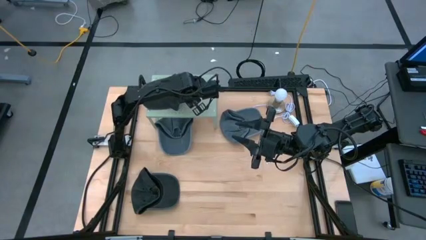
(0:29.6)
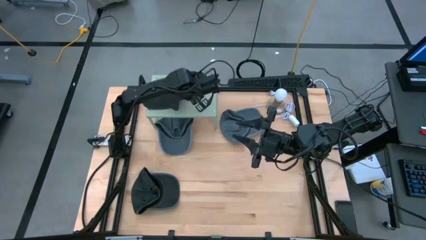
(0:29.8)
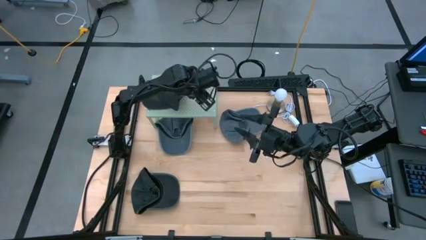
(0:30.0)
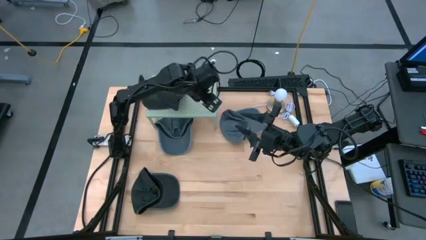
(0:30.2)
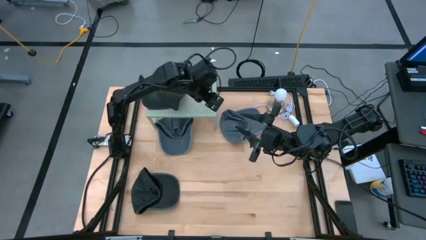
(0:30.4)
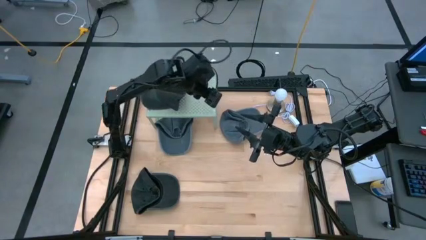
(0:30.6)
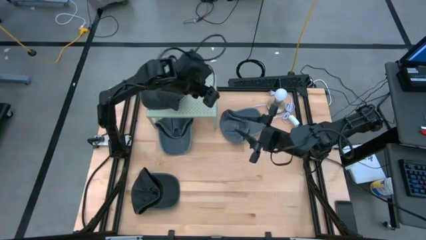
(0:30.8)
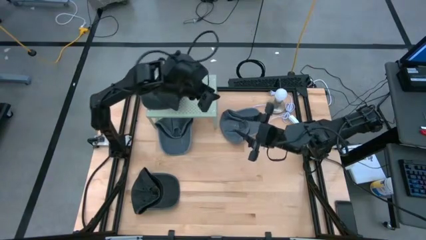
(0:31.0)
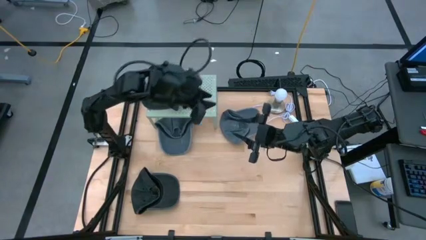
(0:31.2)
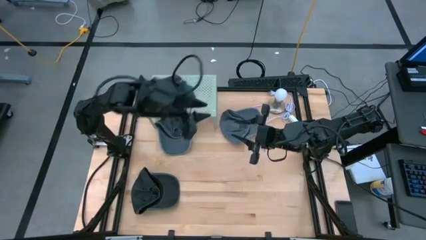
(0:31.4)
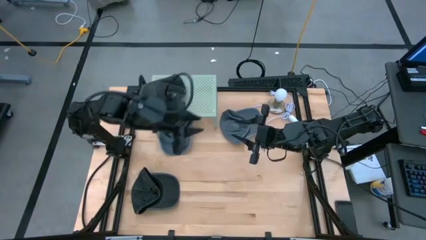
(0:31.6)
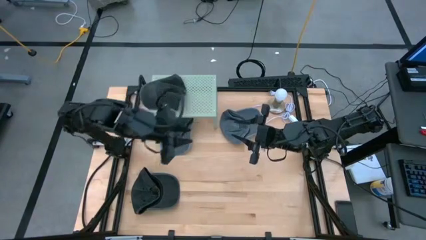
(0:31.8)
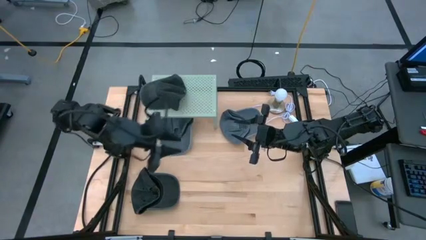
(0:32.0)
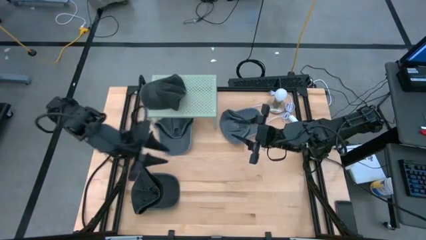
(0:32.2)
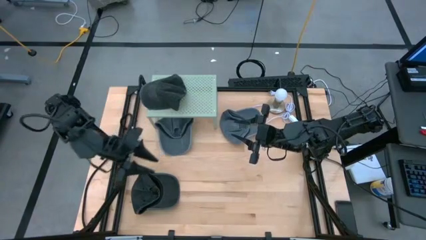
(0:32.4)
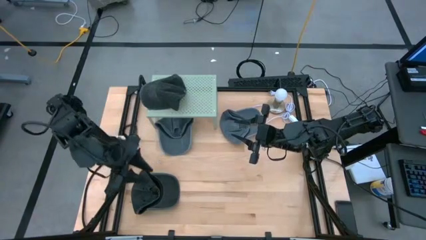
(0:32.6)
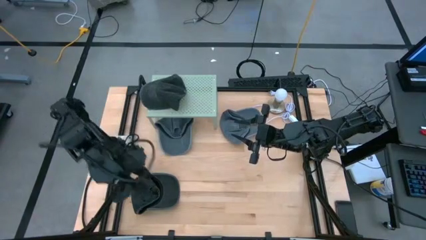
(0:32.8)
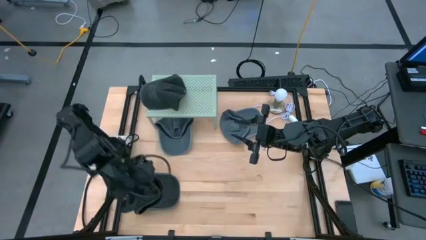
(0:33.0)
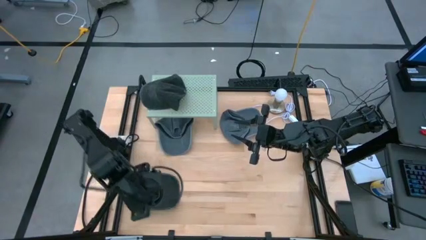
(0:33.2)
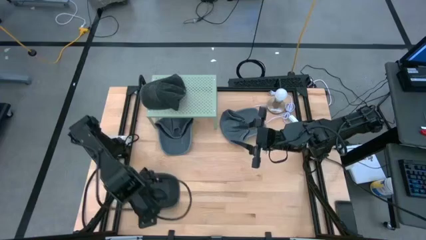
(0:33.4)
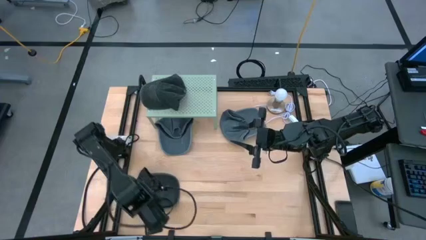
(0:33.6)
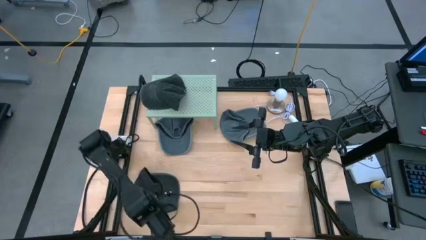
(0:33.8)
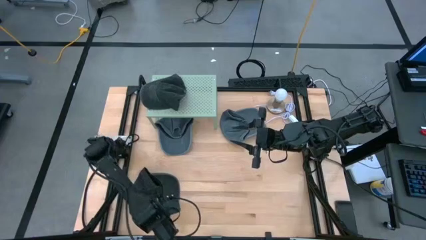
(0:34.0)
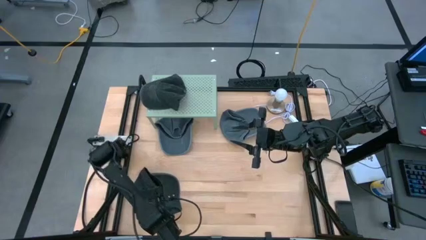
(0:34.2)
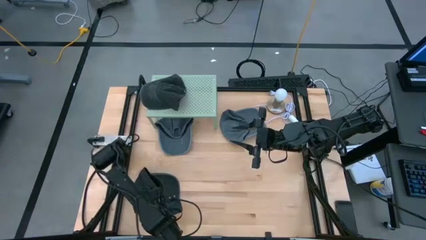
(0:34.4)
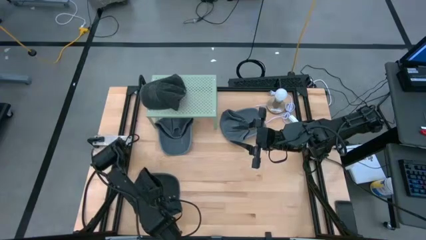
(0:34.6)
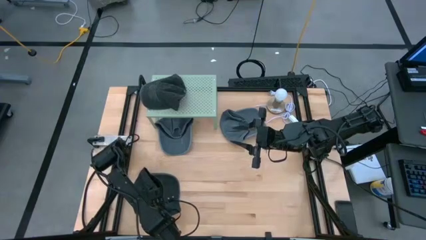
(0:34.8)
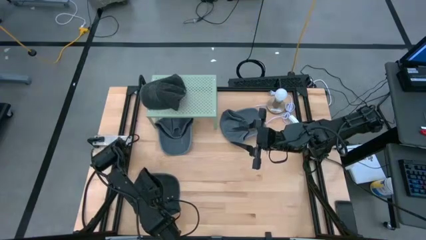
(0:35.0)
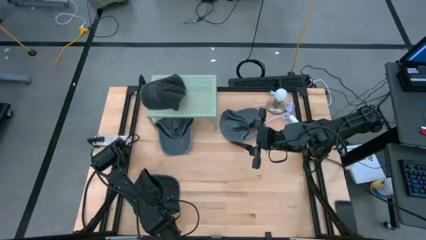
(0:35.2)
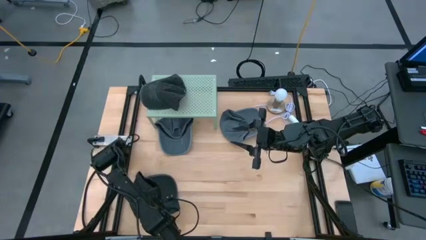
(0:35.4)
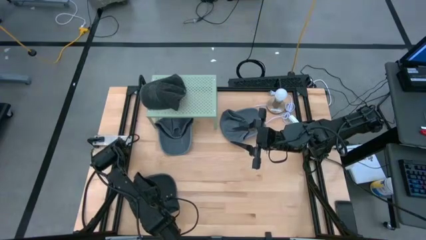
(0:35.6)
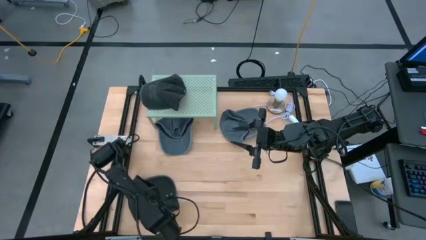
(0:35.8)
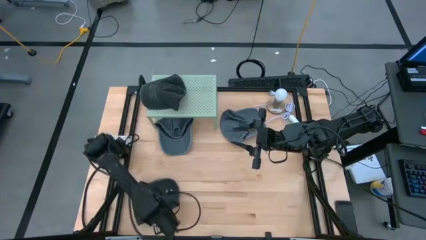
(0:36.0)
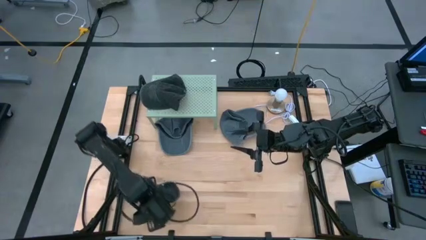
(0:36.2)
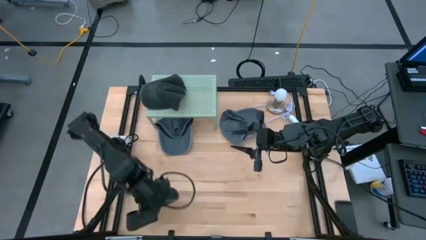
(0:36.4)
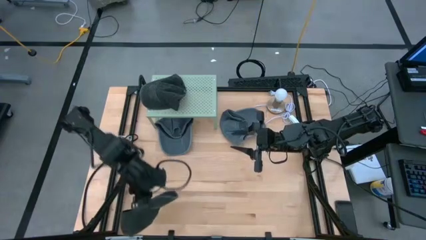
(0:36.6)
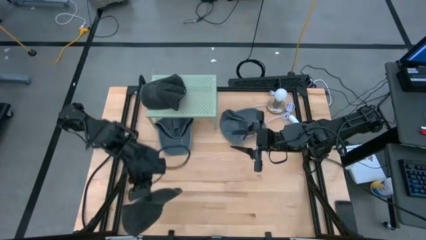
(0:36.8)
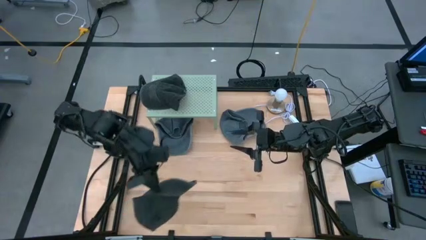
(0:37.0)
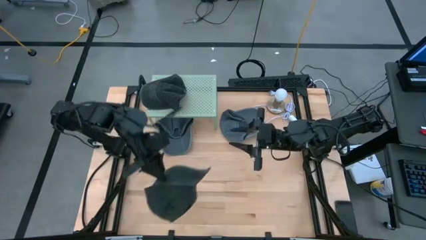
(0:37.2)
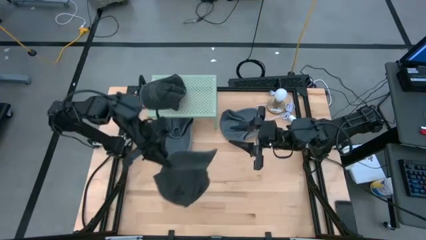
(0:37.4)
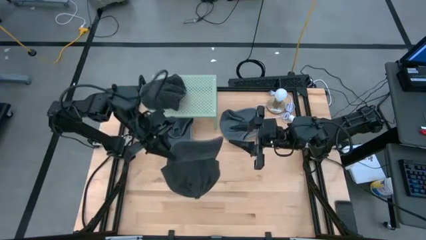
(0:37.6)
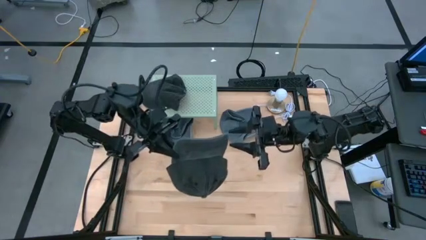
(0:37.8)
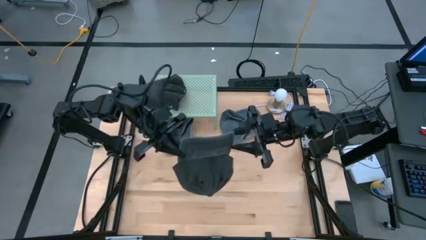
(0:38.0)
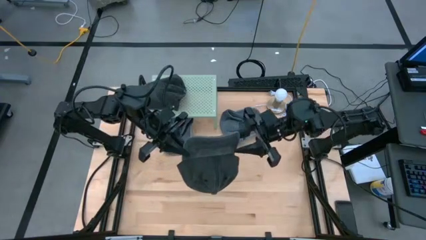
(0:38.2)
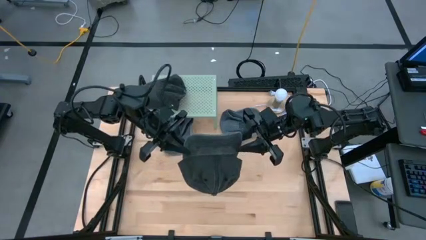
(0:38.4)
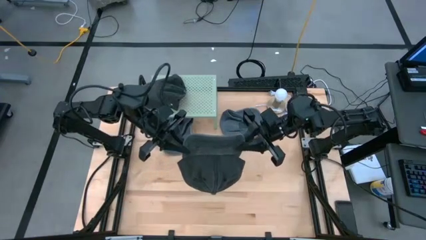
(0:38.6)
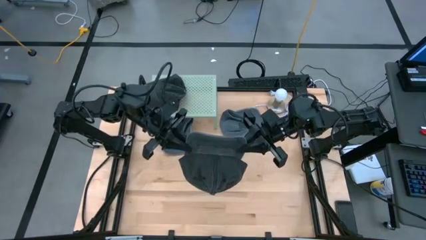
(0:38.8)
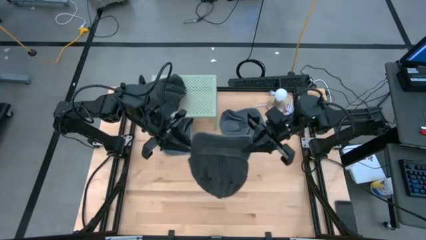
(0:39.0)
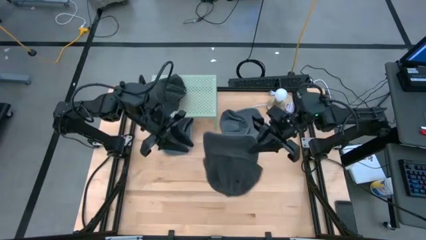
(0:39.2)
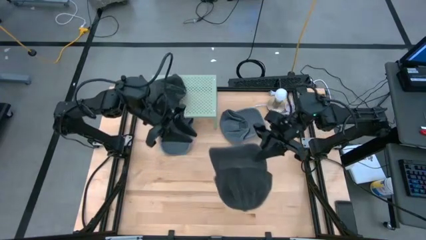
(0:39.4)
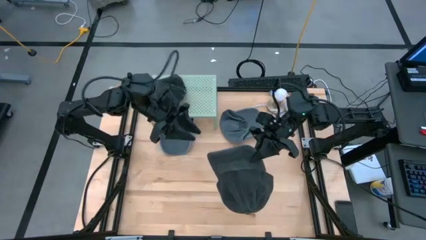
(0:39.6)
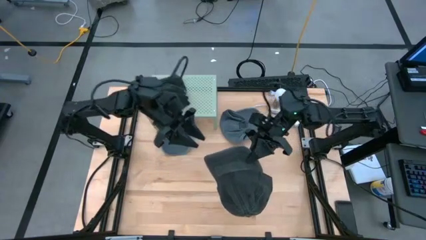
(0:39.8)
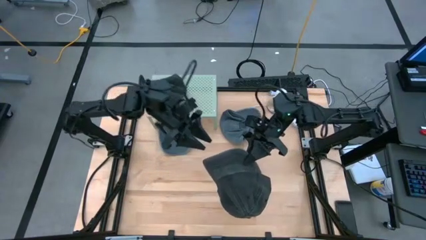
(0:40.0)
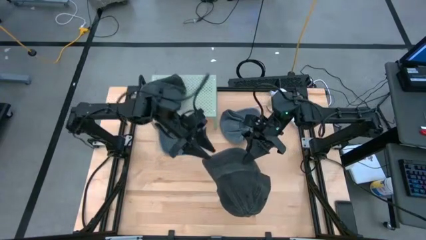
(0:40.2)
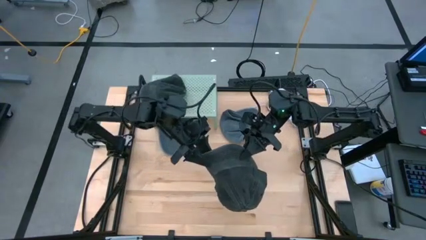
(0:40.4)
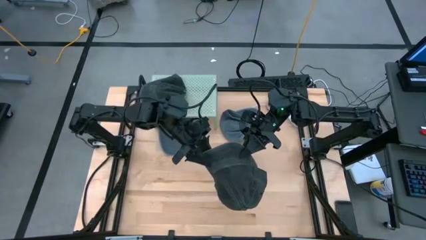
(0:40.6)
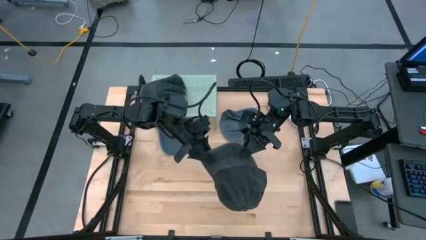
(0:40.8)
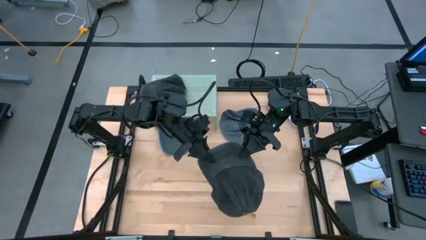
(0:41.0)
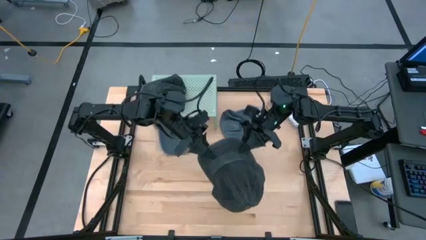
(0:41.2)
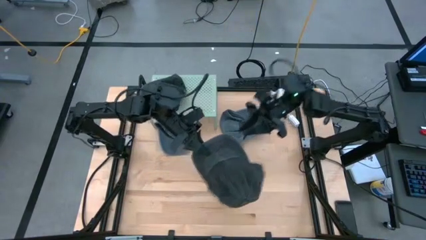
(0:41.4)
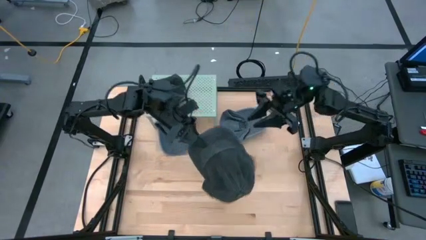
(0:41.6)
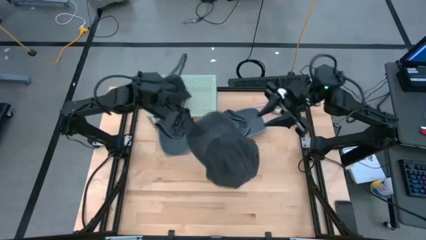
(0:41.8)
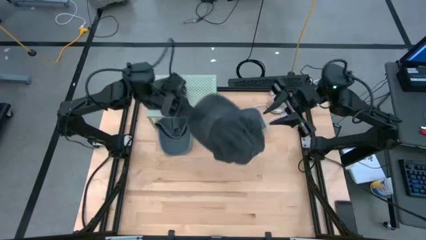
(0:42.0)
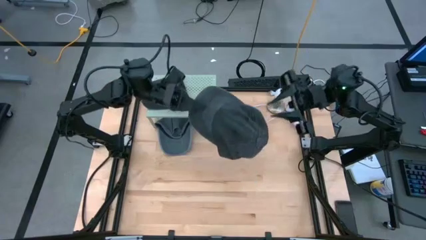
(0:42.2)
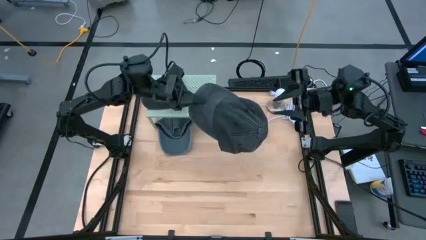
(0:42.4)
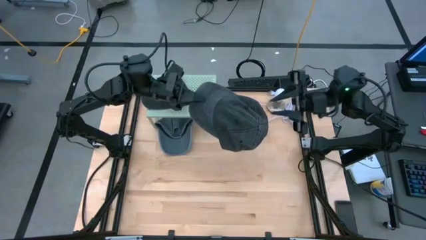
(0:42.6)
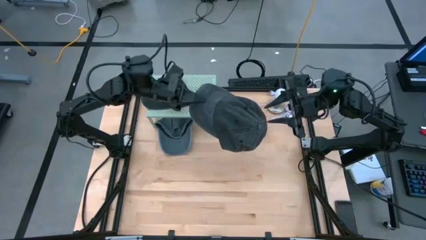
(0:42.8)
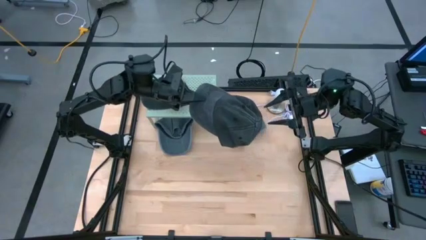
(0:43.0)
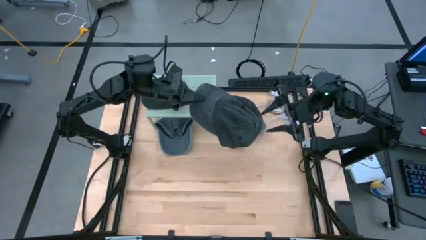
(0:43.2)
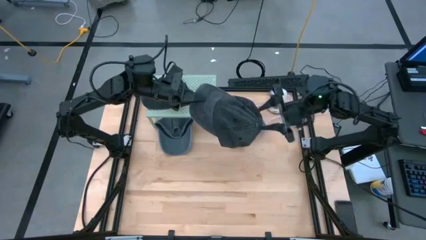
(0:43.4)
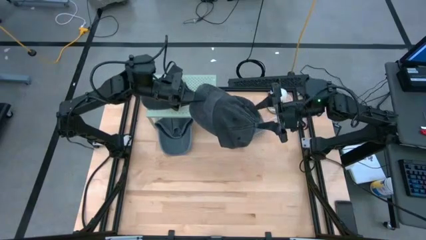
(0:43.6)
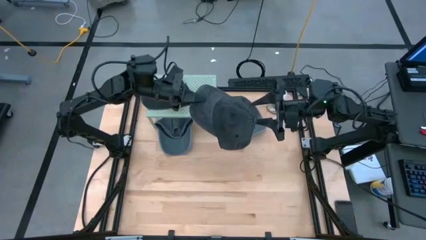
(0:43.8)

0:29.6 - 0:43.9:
Task: Pick & Place hat
Stack the black cap on the black cap on the shelf
